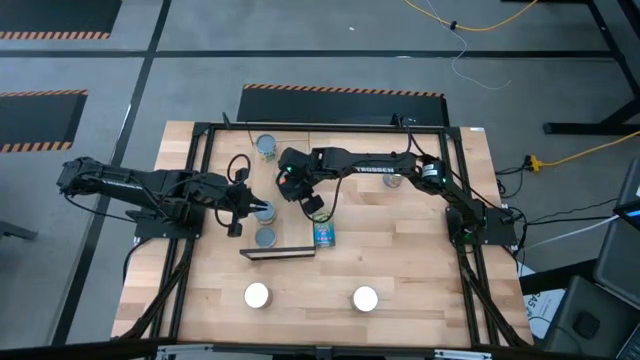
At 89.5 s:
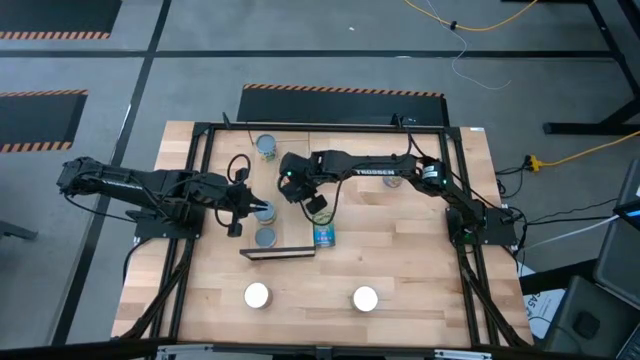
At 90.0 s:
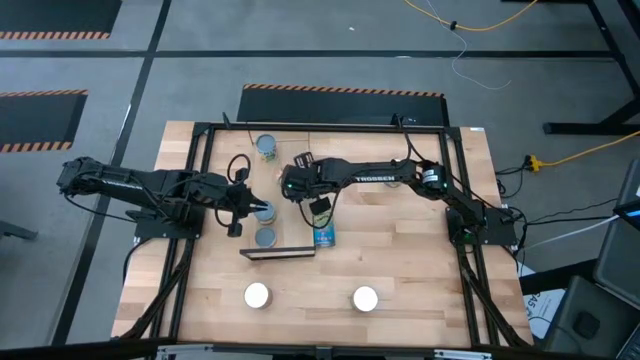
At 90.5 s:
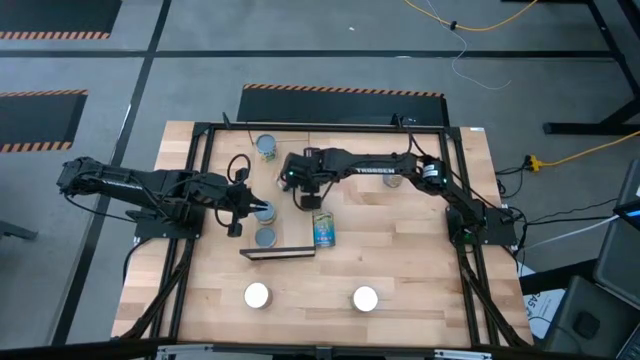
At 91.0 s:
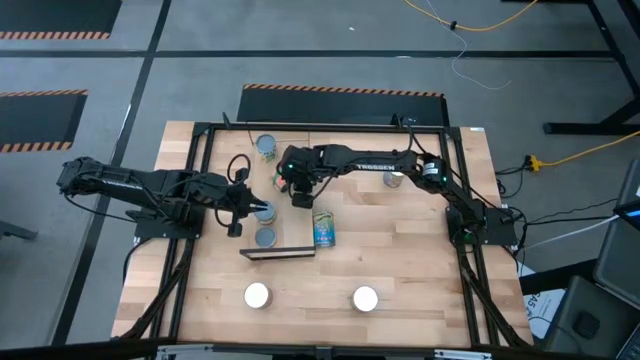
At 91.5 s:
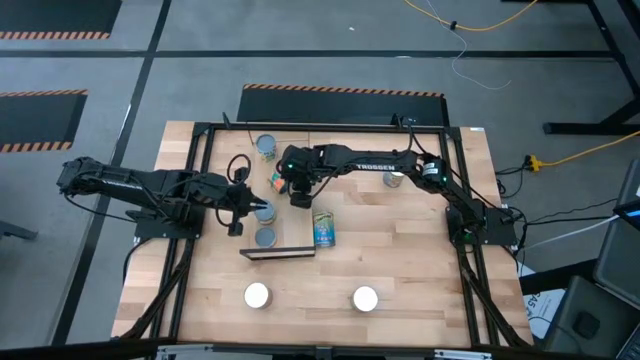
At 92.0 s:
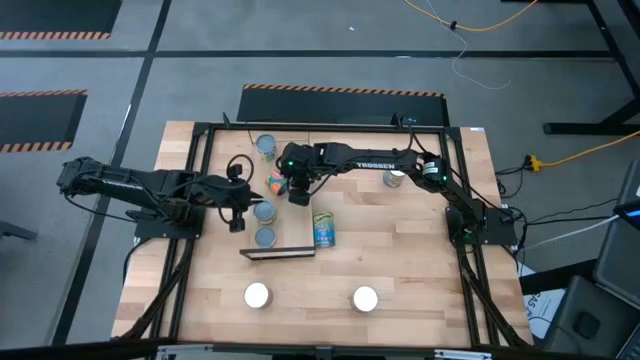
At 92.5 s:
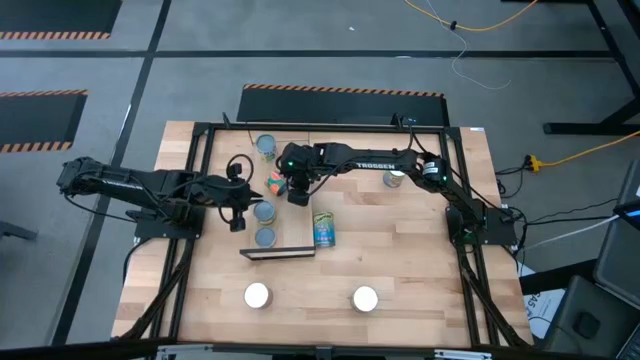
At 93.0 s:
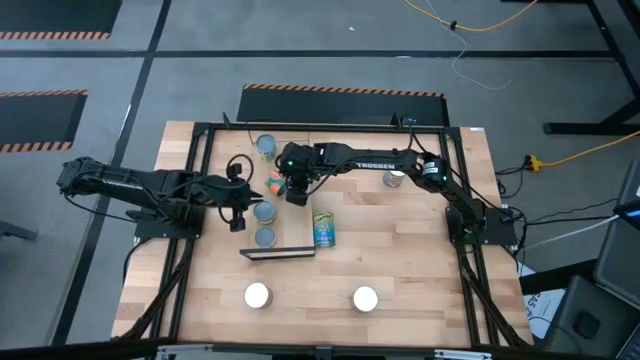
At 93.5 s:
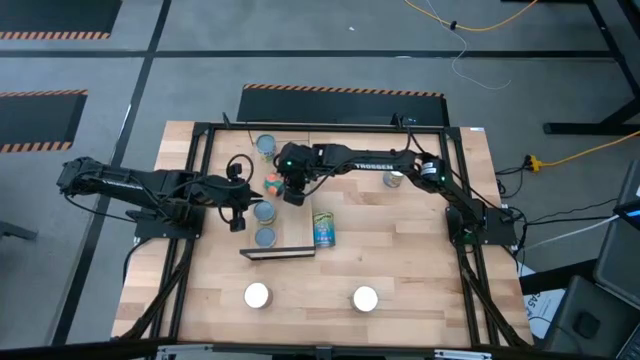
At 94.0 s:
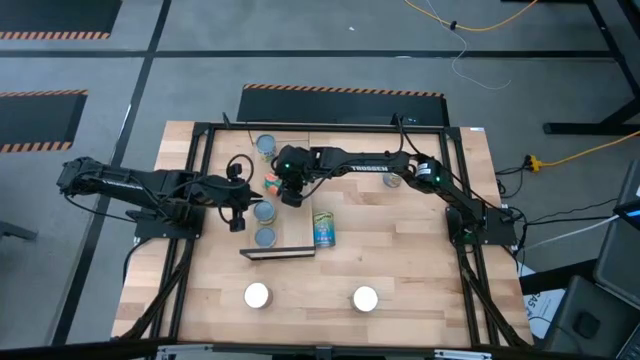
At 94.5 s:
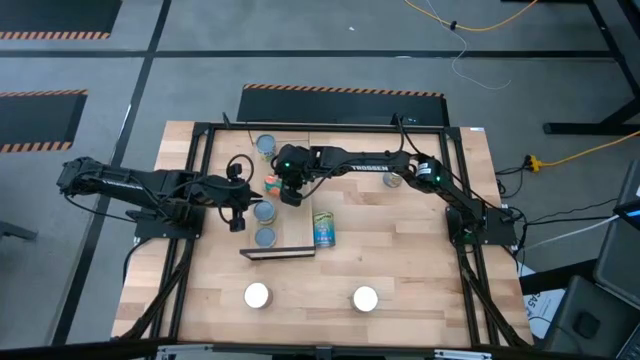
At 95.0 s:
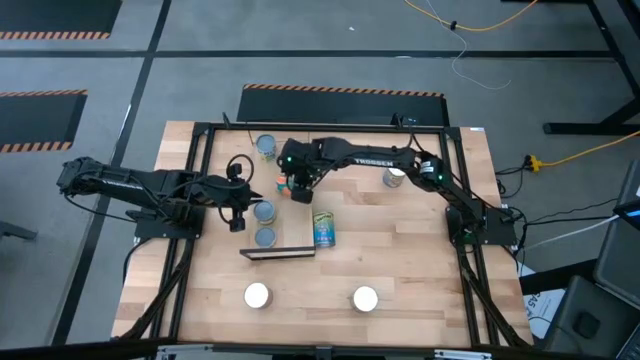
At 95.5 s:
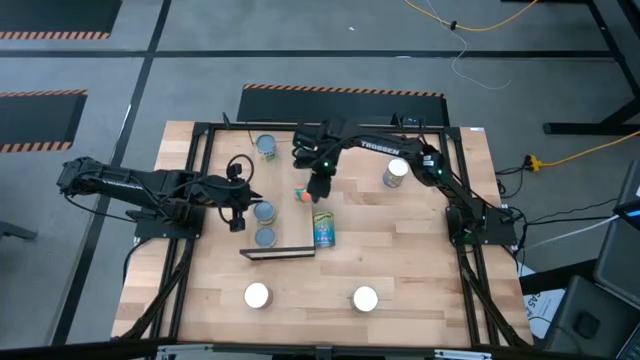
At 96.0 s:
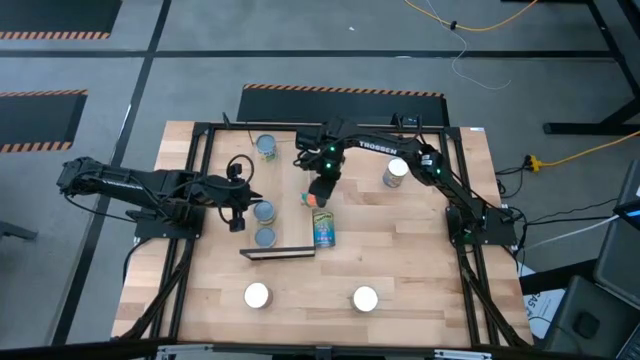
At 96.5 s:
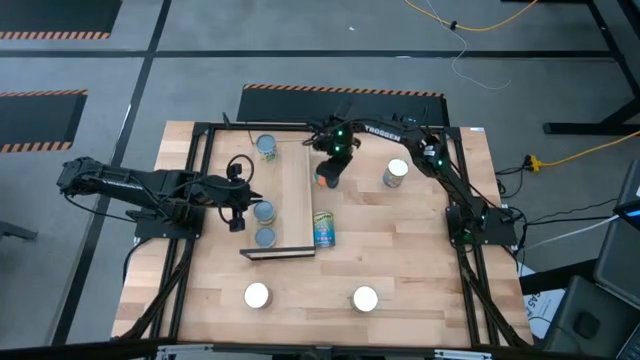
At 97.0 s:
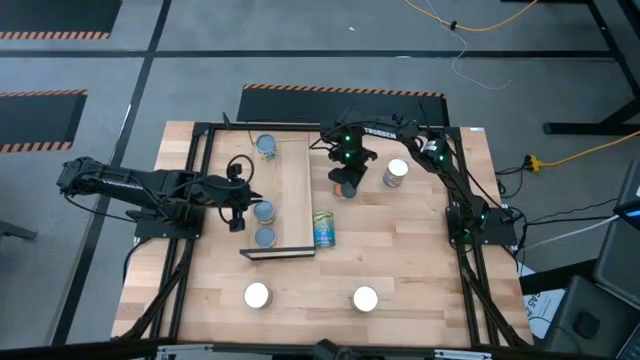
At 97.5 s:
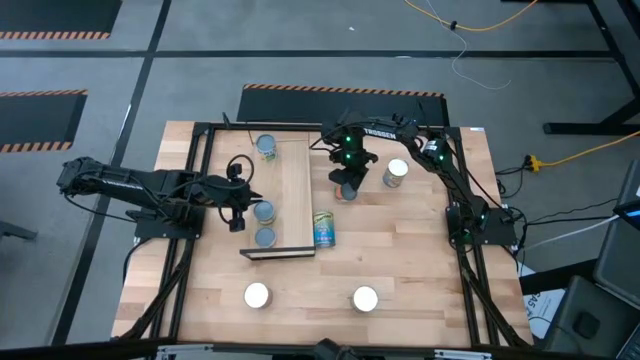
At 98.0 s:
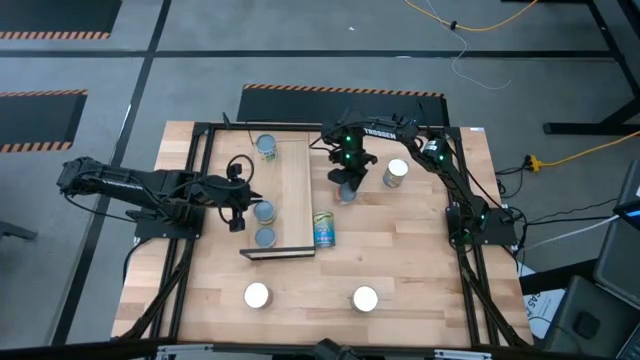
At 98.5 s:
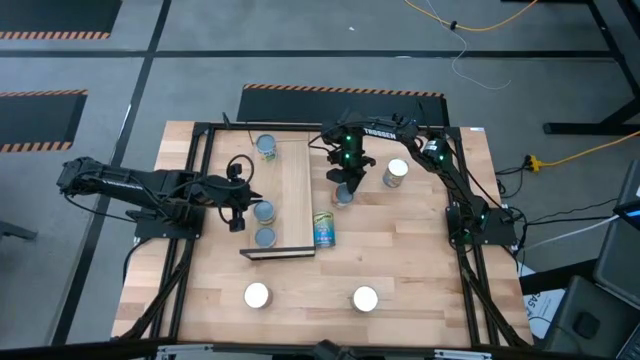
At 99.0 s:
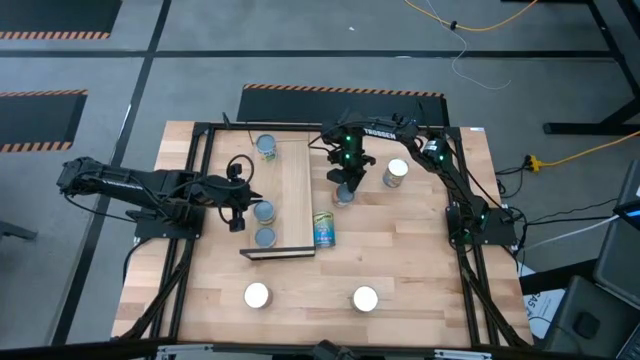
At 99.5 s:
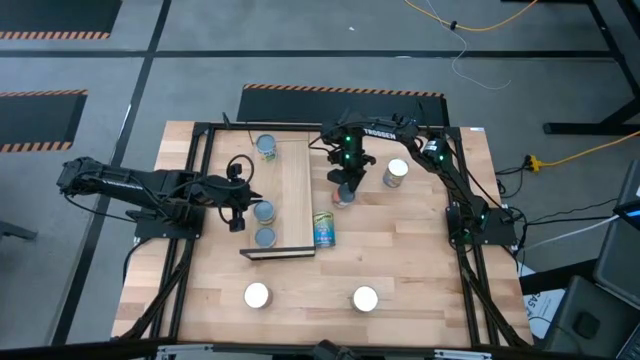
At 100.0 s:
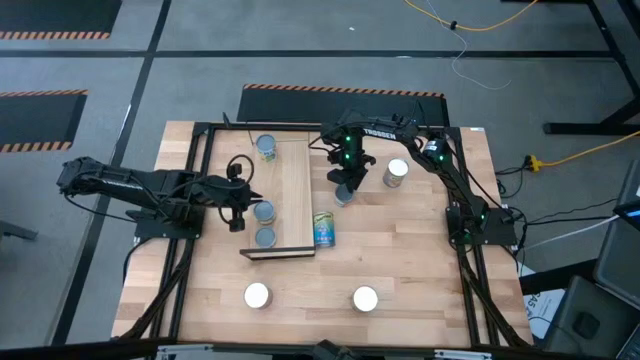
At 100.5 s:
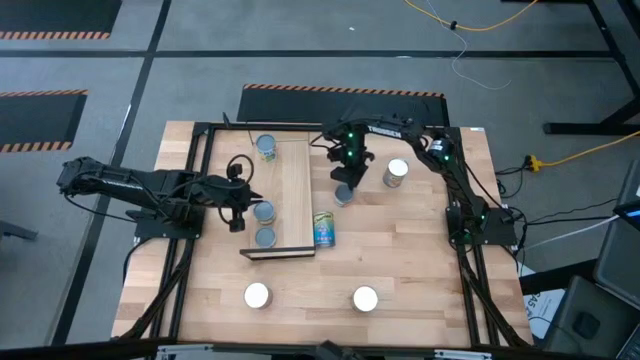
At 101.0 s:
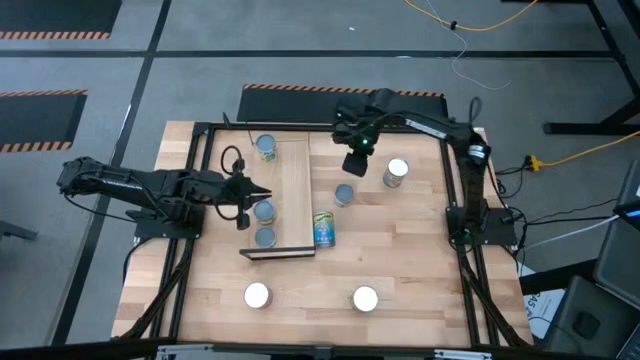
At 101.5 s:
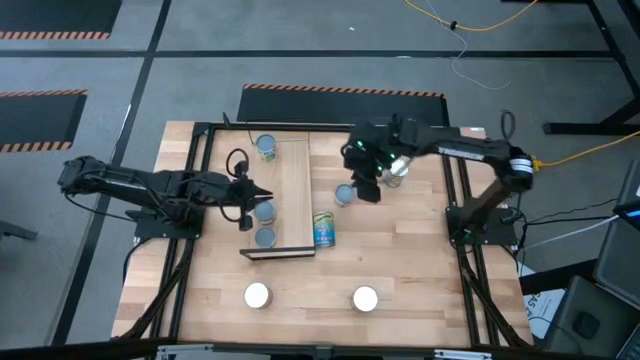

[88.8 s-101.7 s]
Task: Pick and place cans onto a shelf
Put the small canned oranges on the shelf

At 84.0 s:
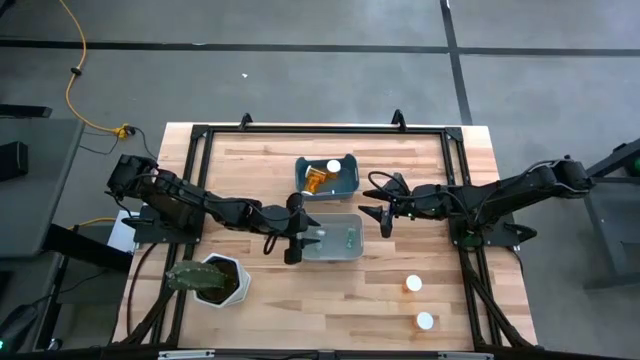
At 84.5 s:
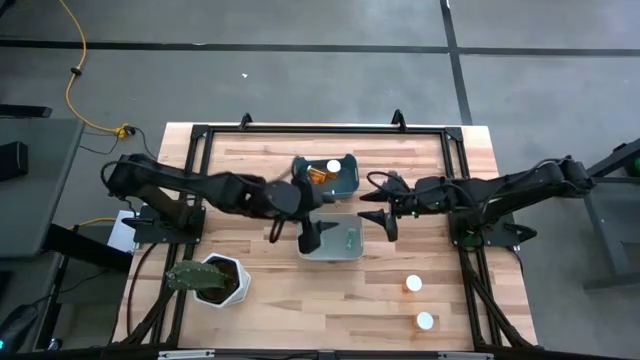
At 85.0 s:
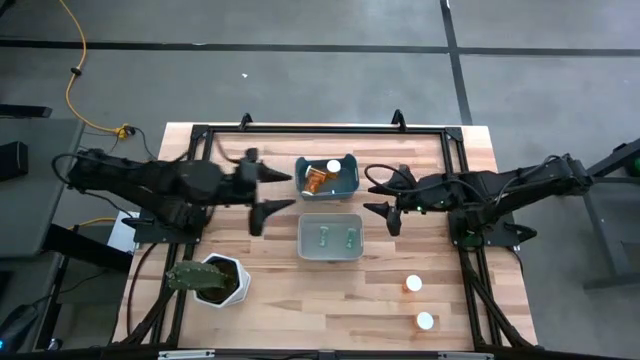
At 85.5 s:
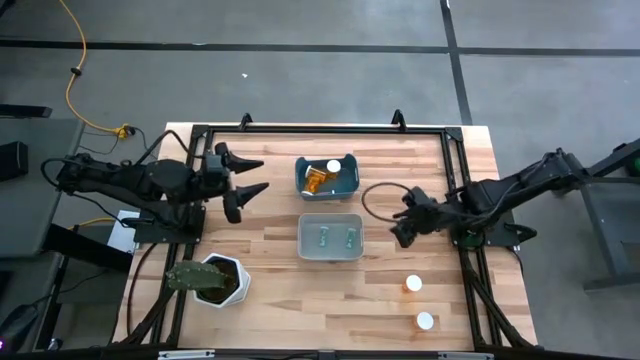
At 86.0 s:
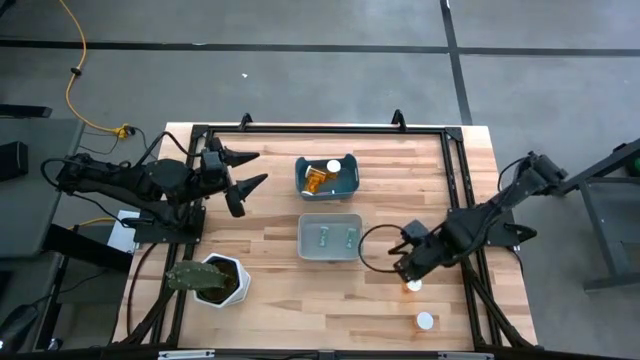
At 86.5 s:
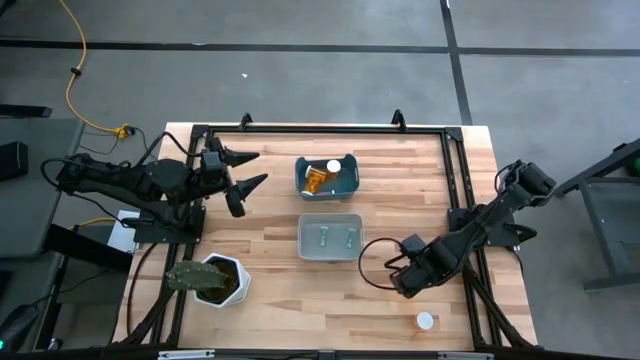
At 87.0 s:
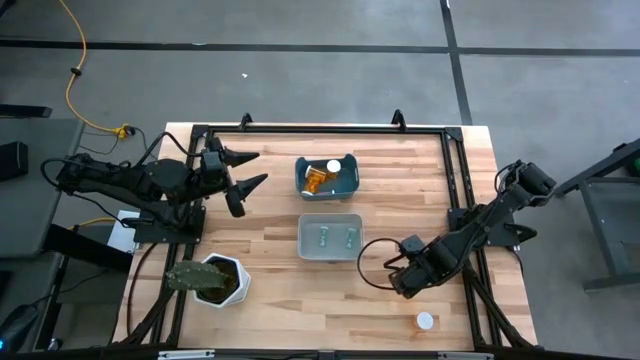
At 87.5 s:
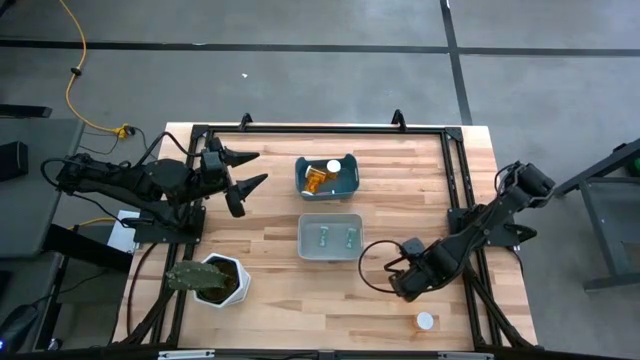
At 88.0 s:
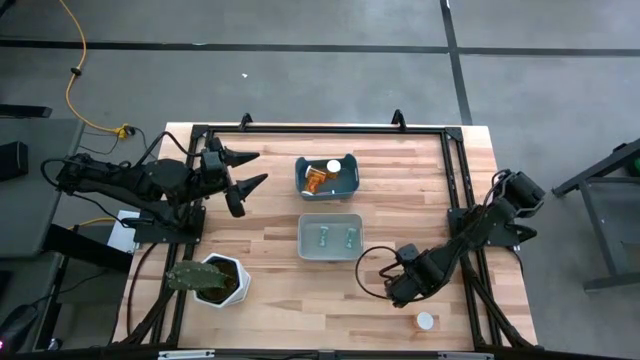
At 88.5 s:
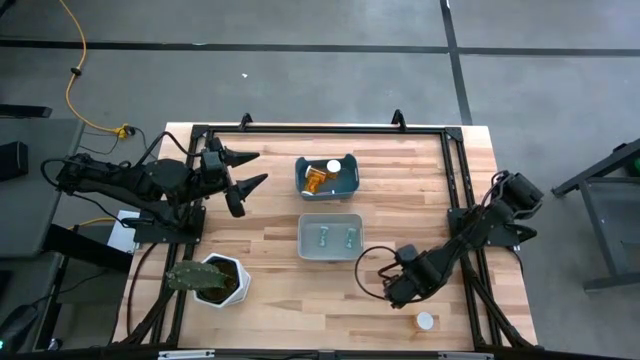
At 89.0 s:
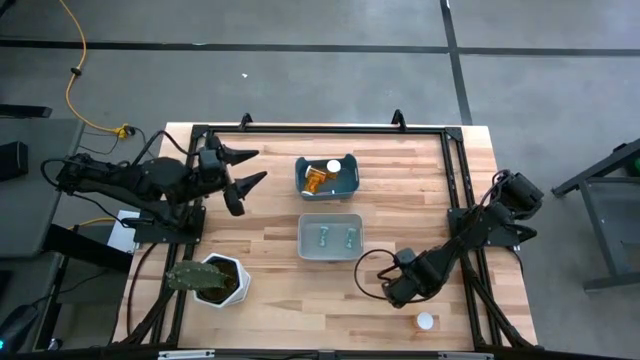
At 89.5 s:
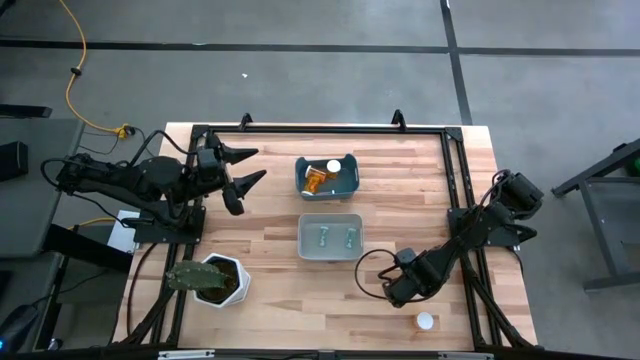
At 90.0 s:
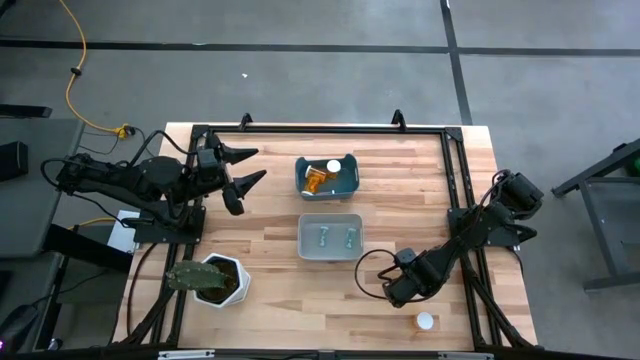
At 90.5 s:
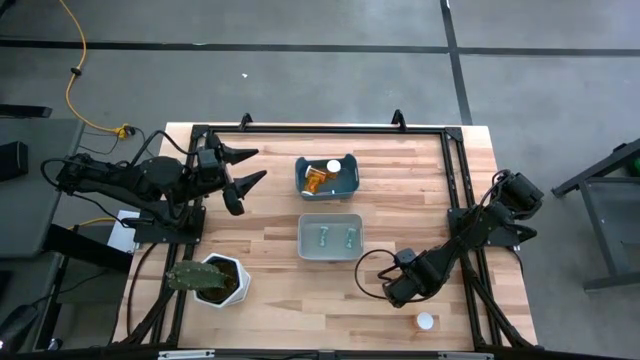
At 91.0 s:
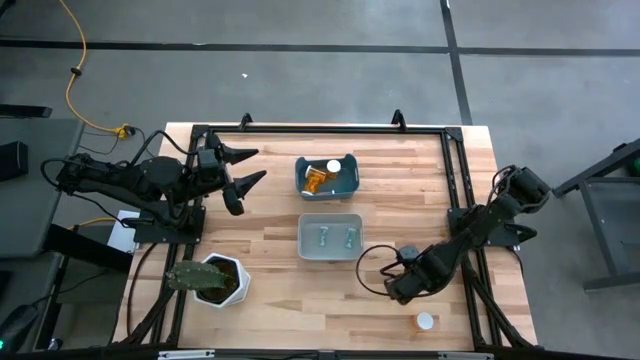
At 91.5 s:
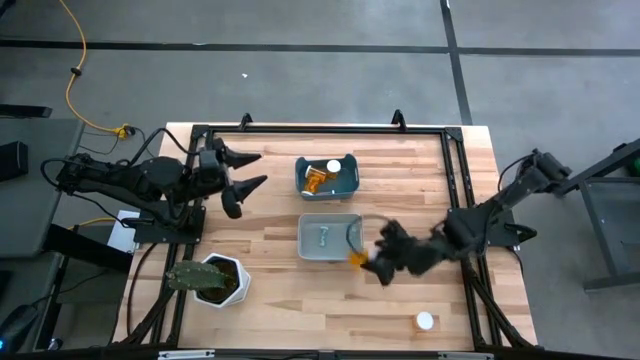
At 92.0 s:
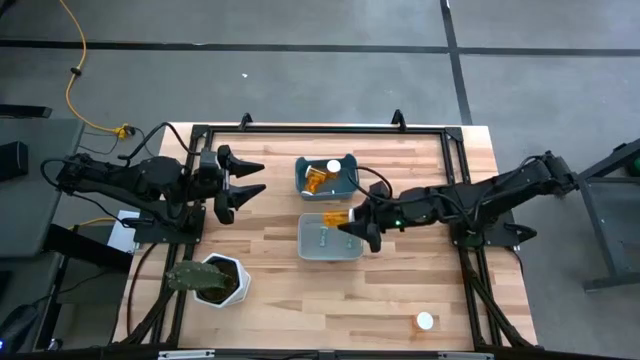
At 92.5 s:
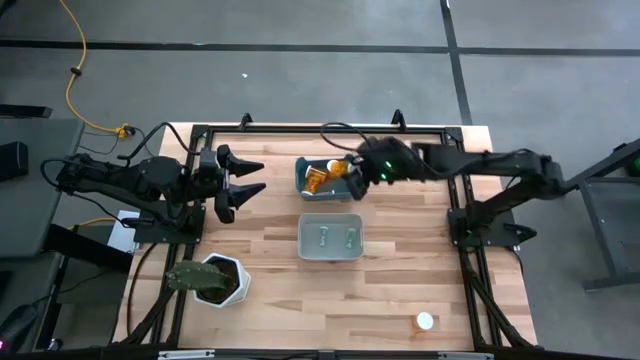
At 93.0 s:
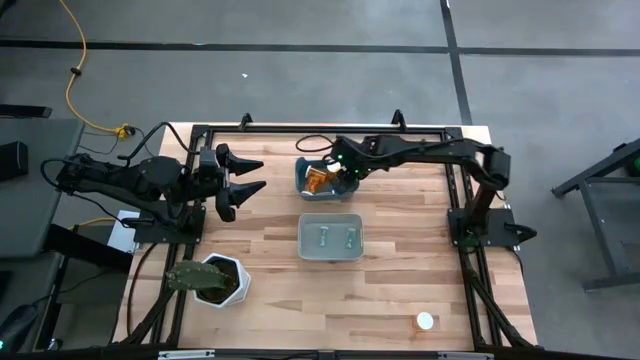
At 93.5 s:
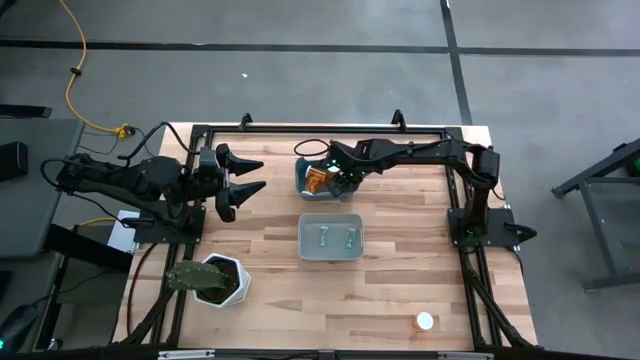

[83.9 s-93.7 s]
Task: Pick and place medicine bottles into bin by pill shape (circle, oval)
Put the orange capsule bottle into the blue bin
